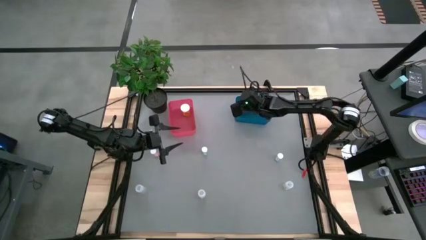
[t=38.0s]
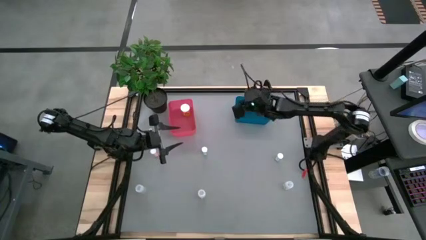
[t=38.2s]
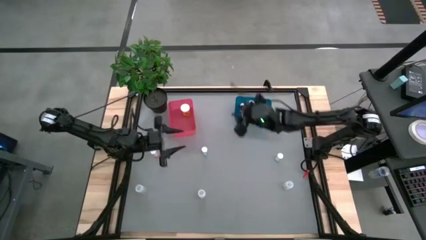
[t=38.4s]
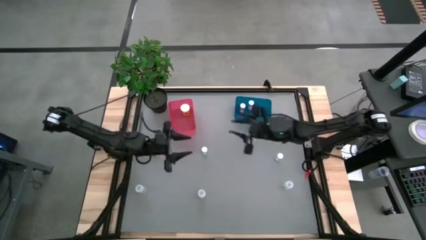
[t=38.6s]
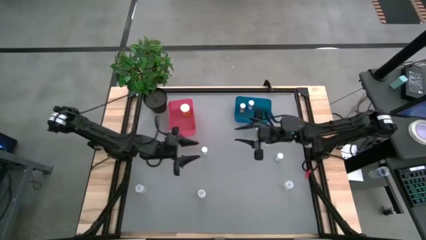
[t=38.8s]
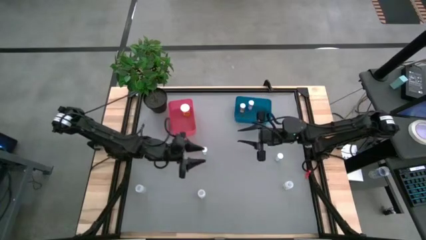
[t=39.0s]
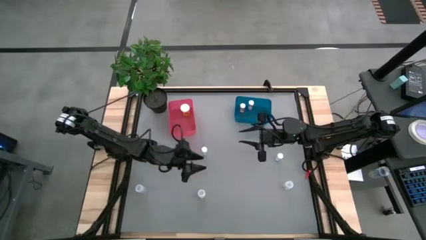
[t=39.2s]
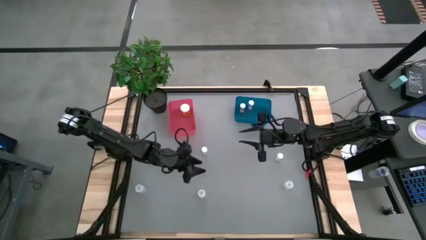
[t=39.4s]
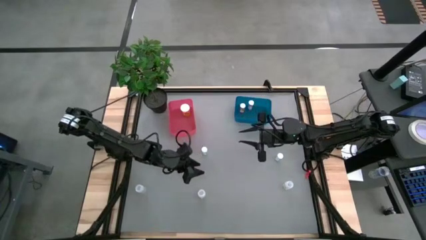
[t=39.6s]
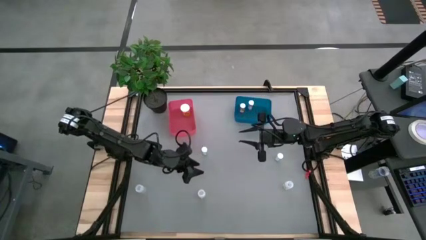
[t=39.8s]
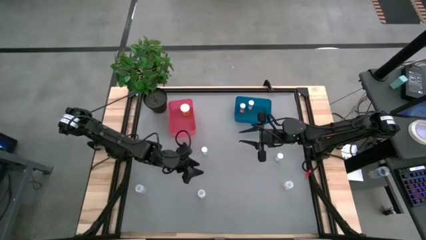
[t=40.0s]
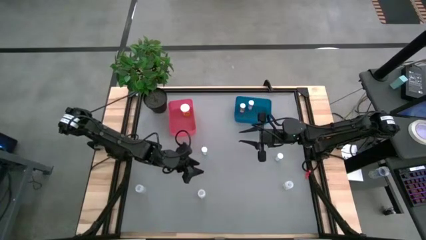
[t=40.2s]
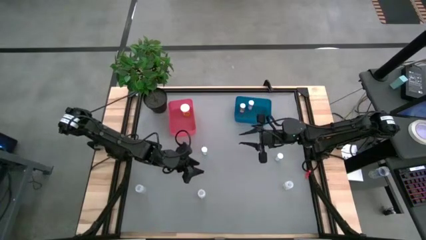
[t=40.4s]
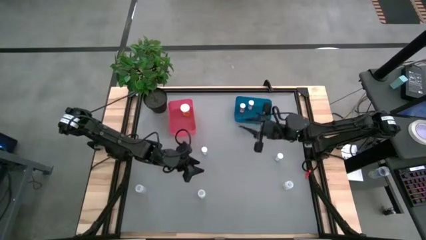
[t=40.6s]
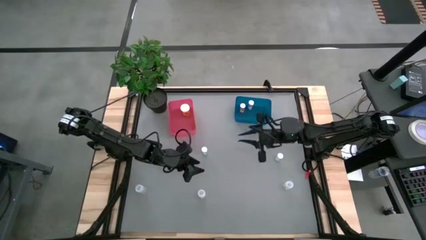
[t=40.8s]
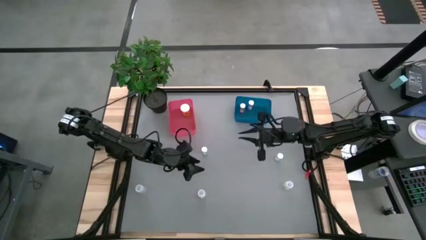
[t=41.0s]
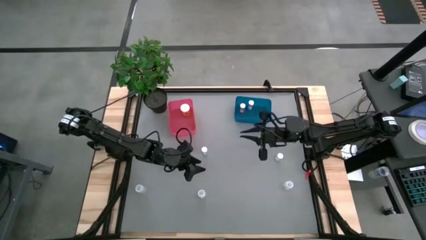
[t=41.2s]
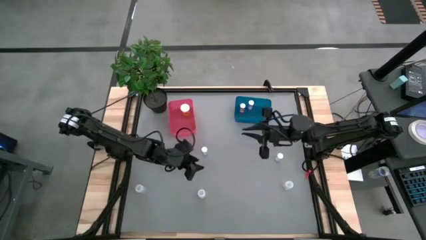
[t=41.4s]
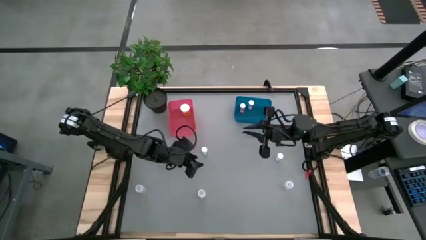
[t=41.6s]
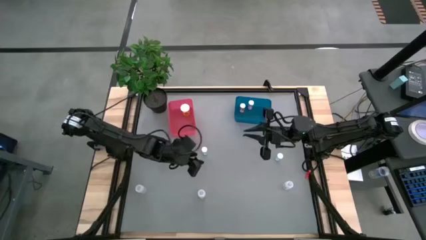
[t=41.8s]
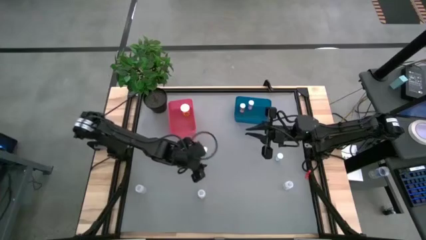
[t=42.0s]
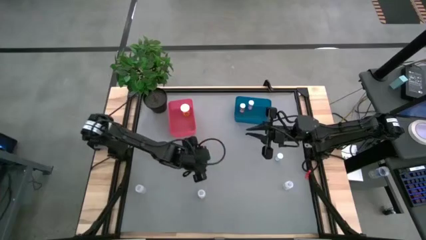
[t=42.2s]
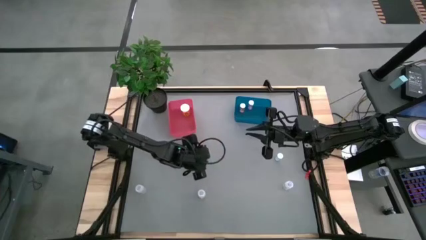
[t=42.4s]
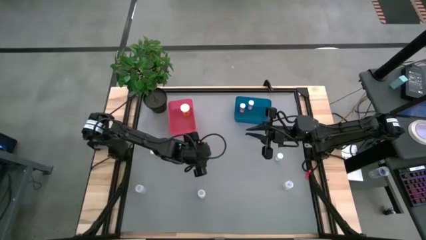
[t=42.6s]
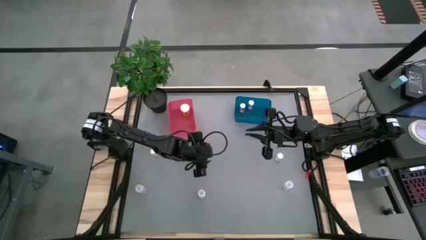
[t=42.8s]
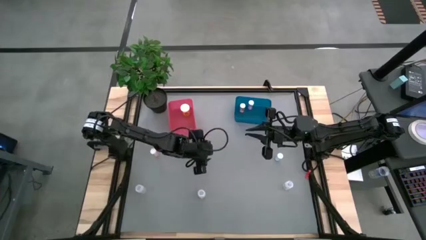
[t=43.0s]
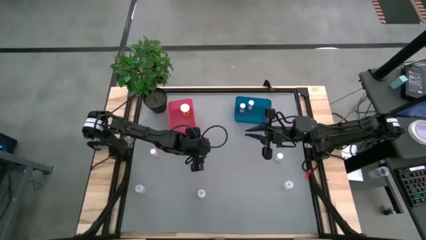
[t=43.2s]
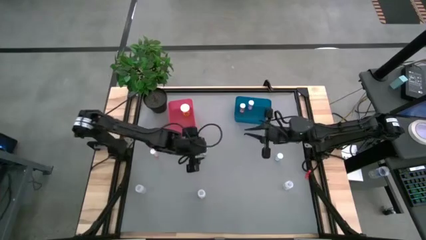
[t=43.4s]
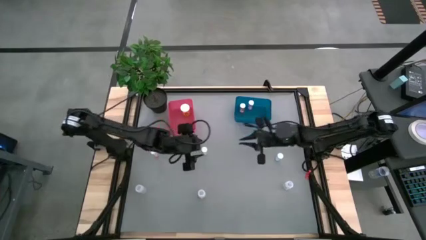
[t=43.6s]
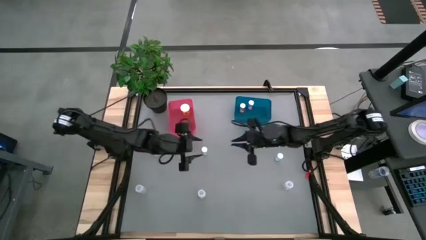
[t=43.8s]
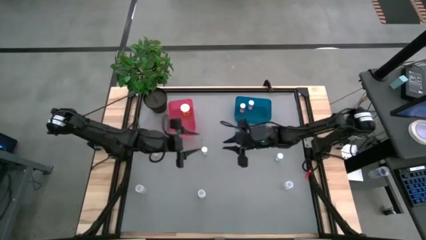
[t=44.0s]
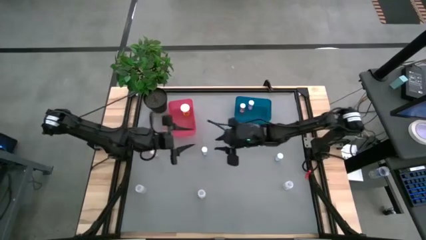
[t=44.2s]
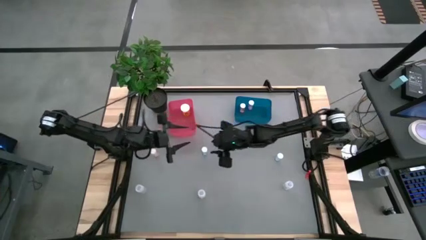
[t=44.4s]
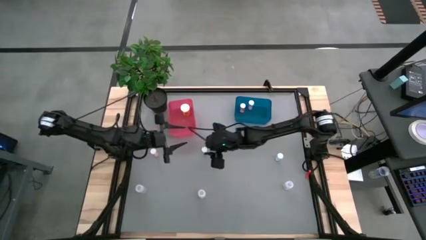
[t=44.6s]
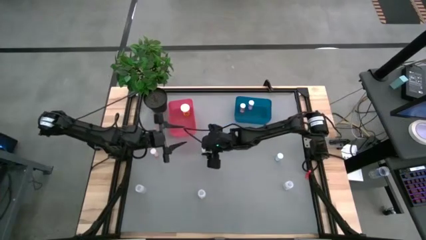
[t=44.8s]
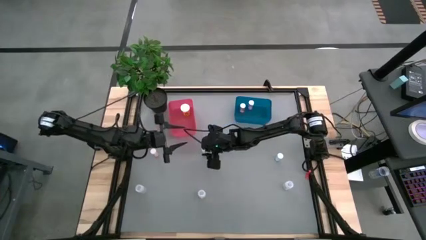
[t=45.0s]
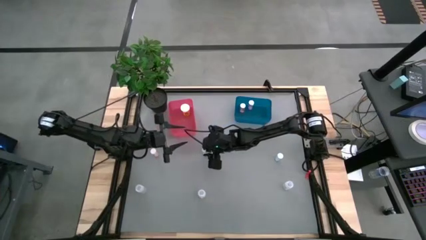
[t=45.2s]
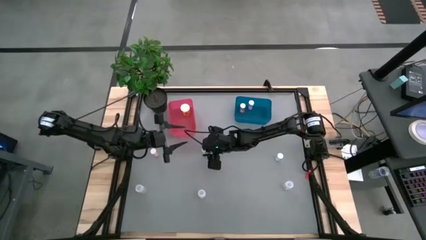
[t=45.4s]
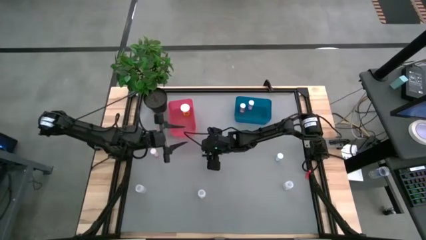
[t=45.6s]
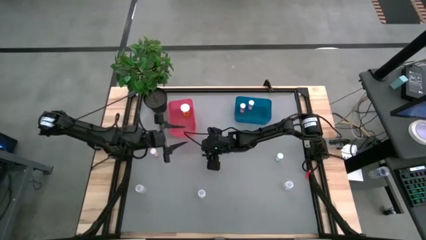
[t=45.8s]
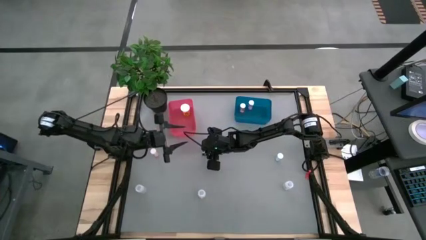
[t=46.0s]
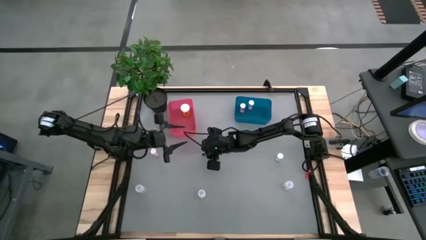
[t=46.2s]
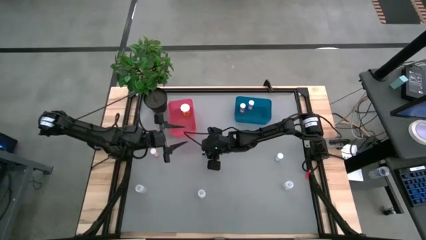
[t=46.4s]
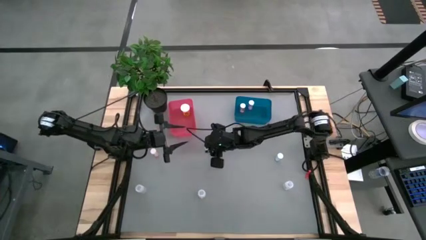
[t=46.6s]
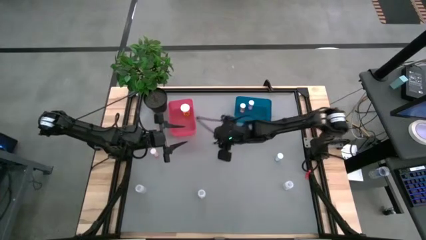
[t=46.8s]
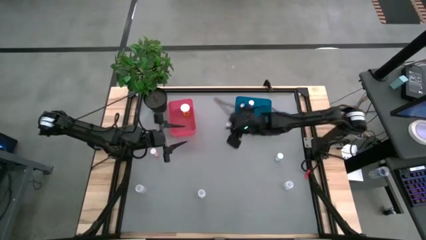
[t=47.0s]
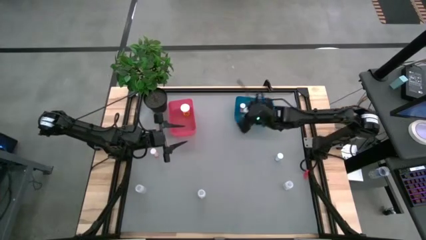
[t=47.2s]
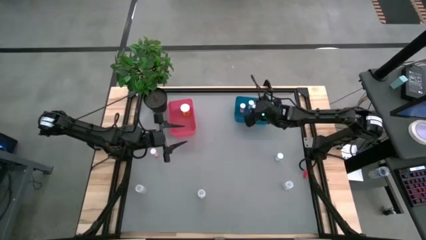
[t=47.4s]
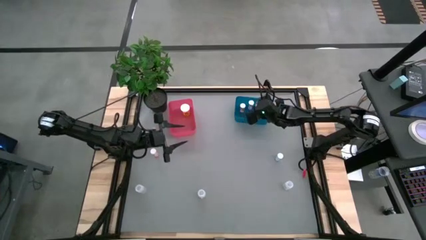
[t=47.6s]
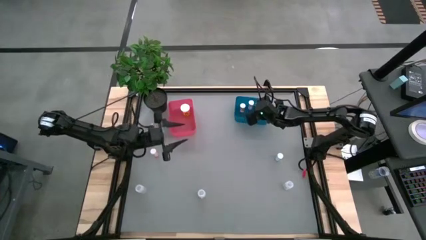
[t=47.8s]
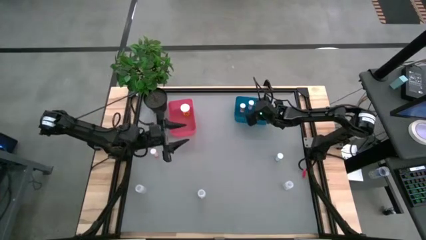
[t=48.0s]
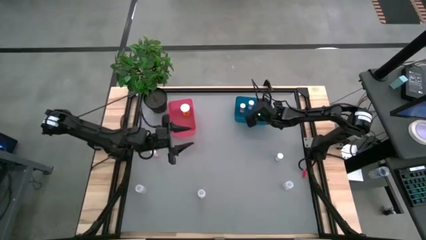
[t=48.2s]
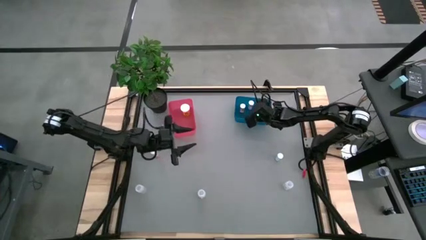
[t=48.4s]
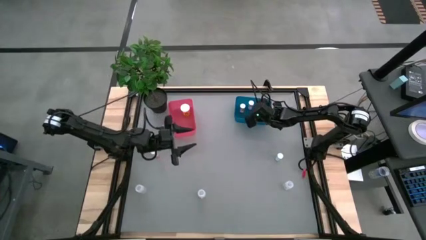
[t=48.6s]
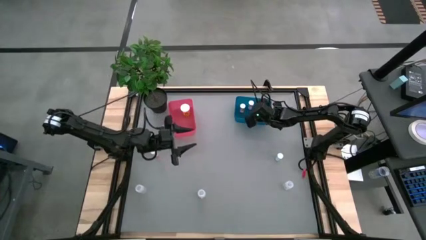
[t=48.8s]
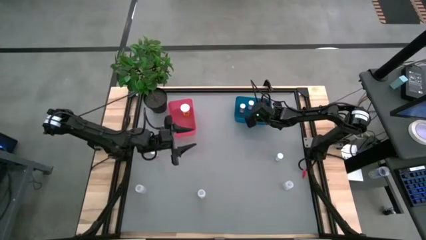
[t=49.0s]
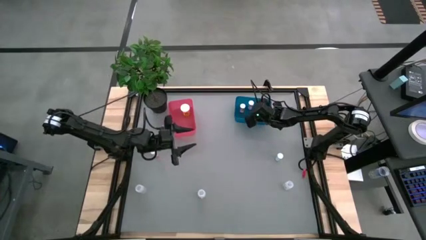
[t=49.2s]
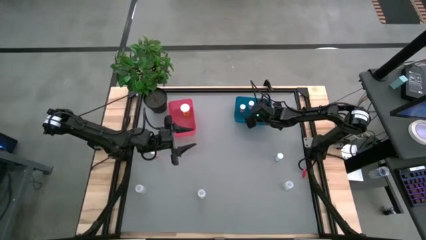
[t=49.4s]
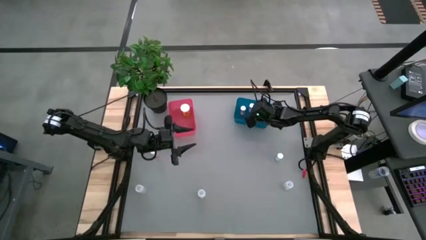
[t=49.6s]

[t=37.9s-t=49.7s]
Task: Pick and place medicine bottles into bin by pill shape (circle, oval)
Put the green tablet bottle into the blue bin

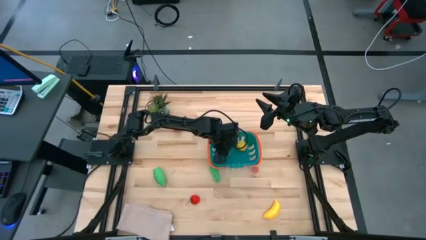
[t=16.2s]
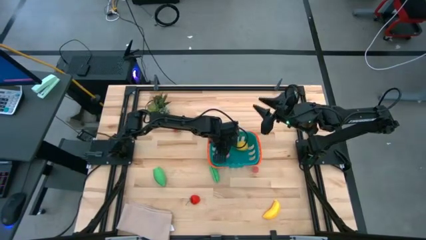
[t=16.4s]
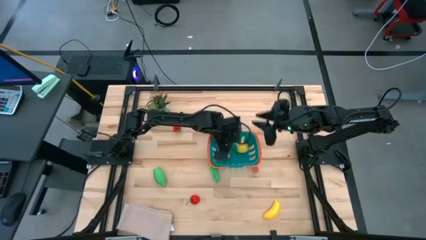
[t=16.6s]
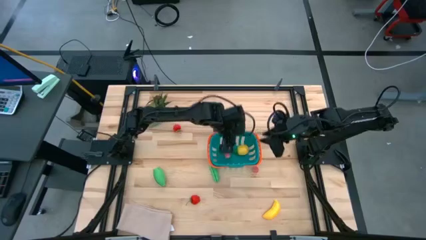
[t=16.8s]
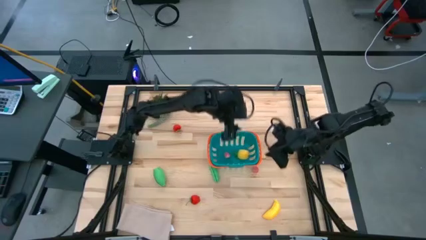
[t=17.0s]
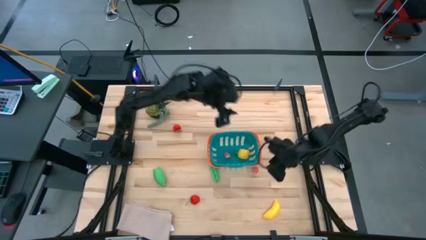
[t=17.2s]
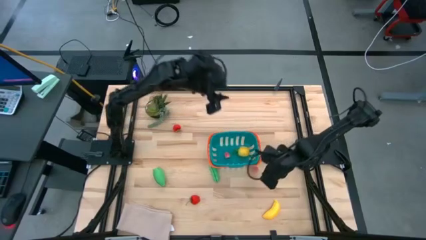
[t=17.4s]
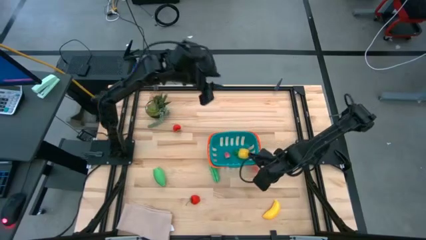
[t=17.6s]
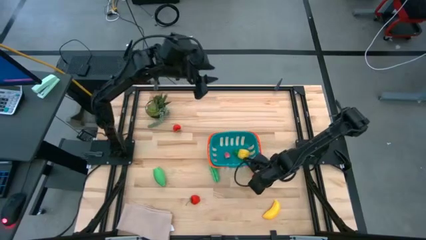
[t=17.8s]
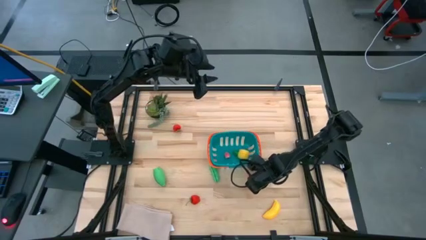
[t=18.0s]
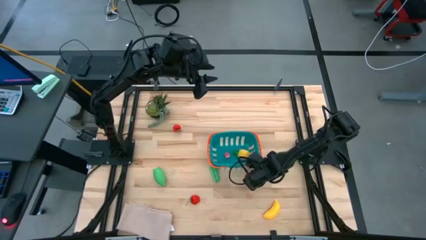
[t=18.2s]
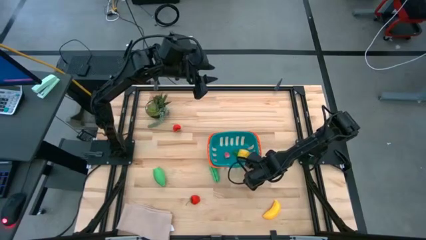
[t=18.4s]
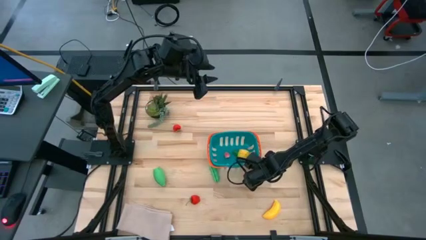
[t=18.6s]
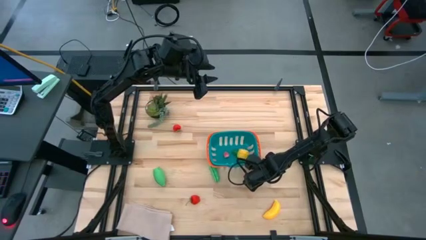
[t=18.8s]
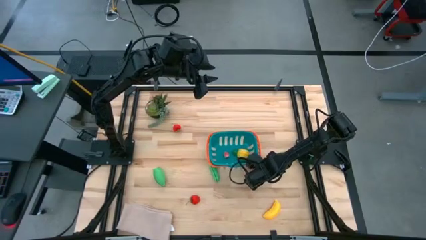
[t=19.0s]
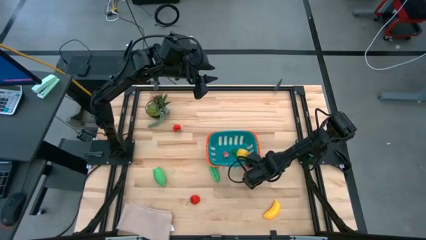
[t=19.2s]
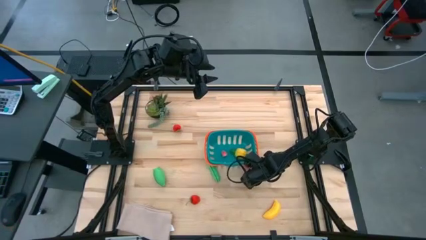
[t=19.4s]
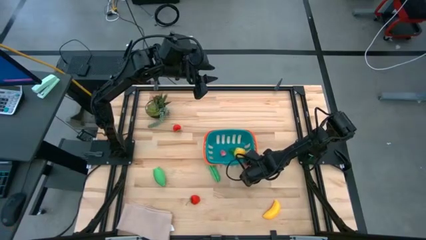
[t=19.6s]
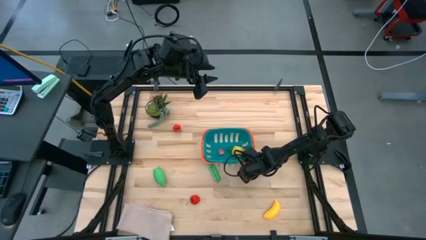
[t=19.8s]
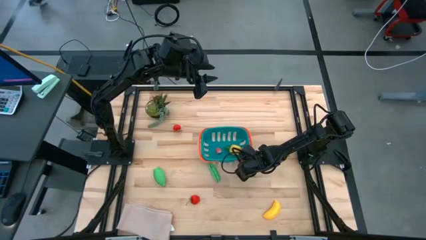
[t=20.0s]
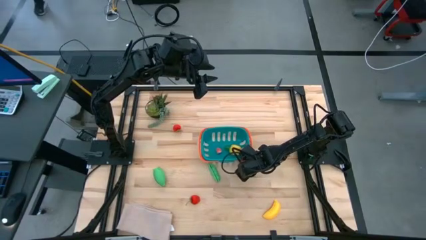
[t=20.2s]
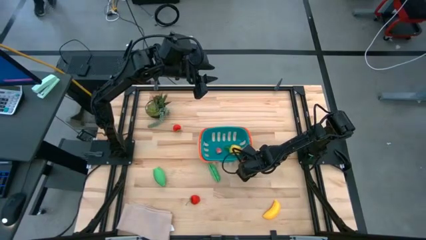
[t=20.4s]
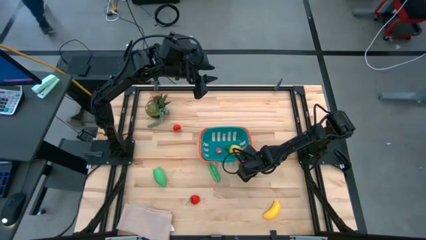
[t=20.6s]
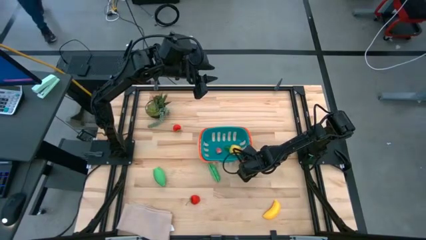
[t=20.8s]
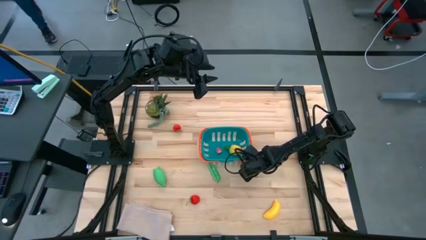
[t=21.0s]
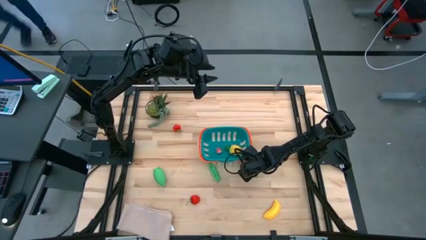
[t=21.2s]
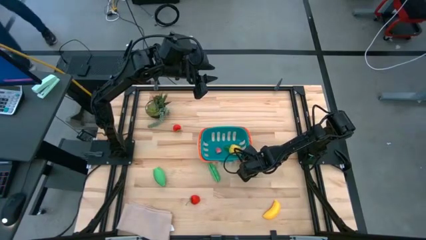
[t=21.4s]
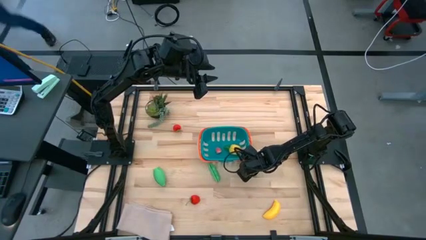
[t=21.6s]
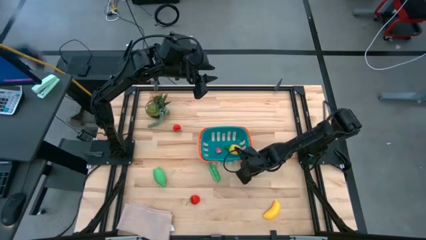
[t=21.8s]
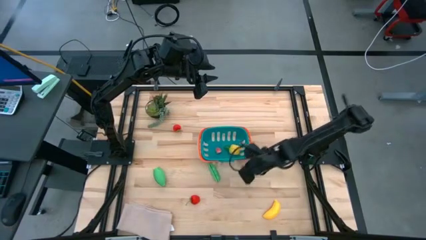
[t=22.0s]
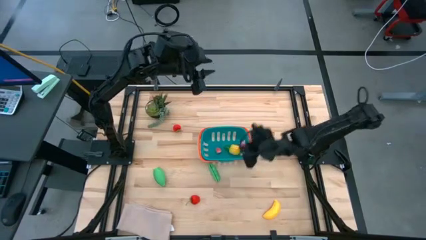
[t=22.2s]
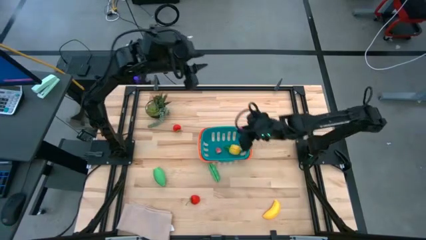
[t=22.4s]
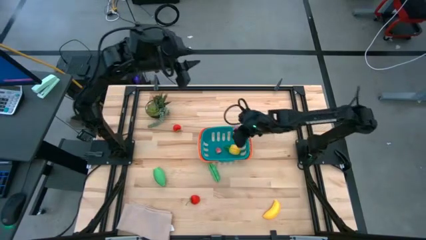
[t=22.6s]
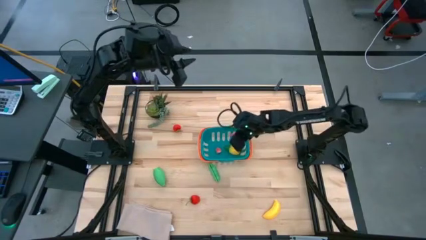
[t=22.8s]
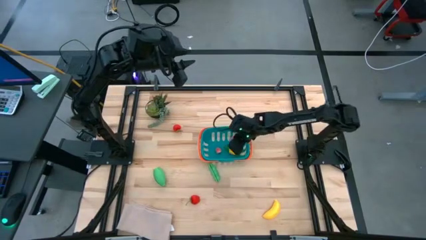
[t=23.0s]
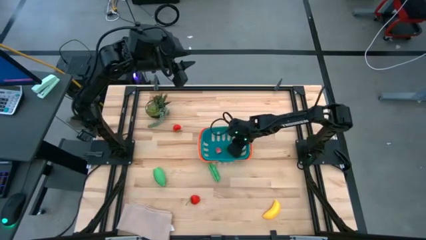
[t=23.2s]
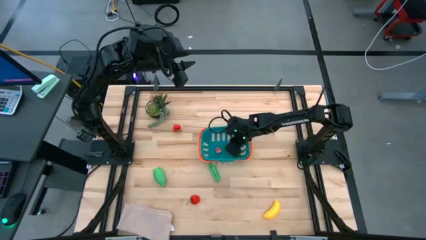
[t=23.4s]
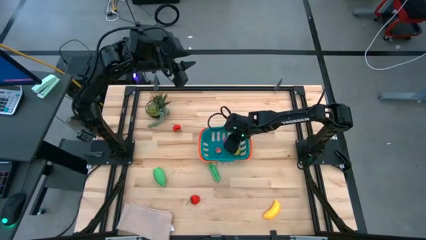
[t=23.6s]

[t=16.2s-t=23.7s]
Task: Pick and placing Produce into tupperware
Put the pink peach into the blue bin
